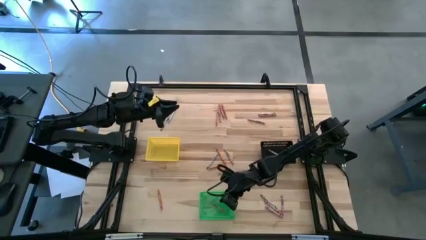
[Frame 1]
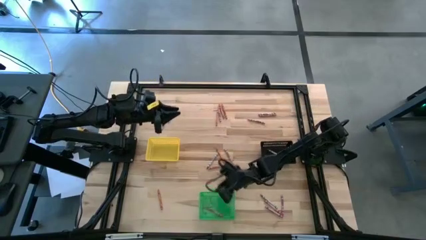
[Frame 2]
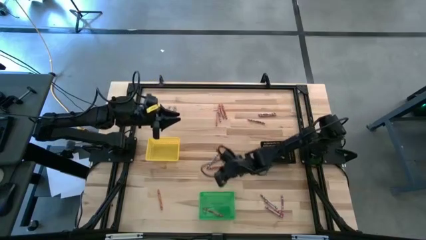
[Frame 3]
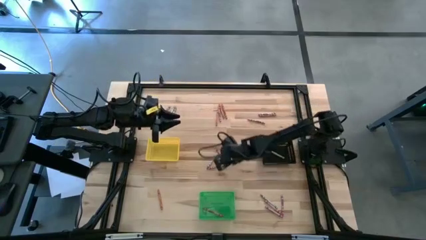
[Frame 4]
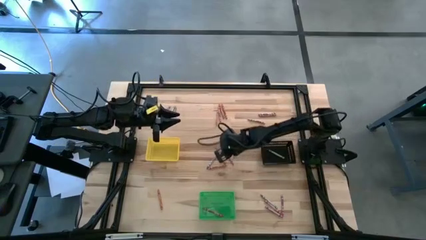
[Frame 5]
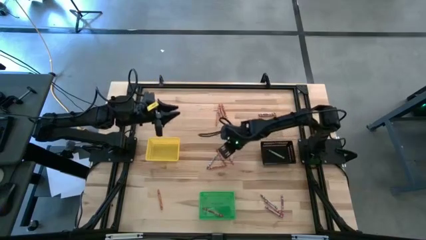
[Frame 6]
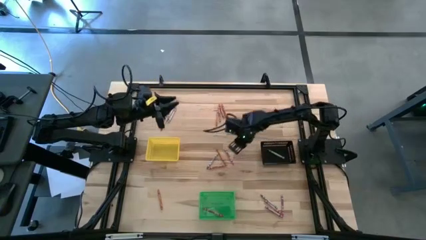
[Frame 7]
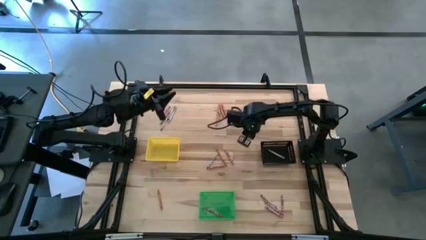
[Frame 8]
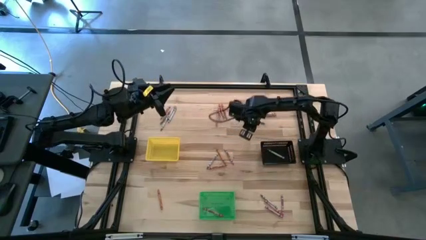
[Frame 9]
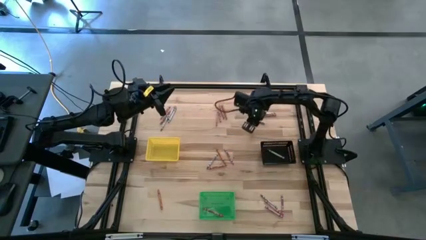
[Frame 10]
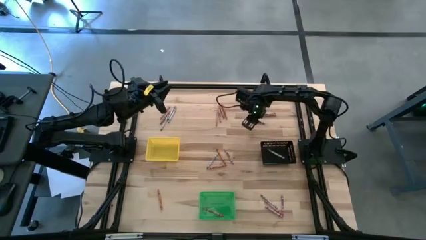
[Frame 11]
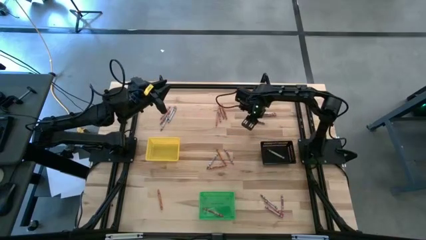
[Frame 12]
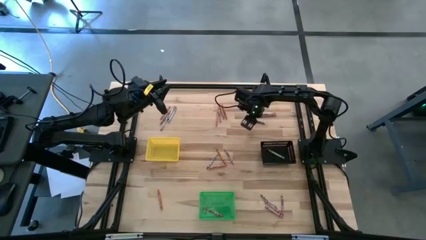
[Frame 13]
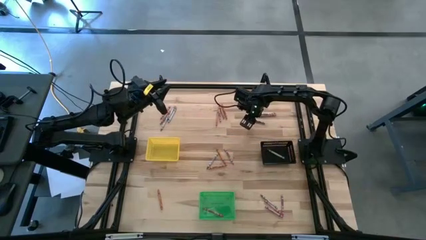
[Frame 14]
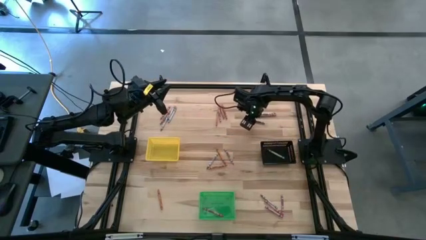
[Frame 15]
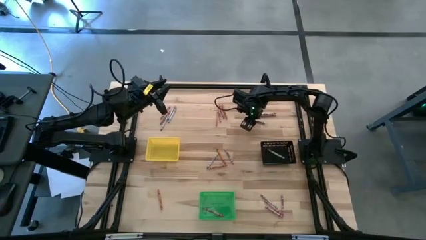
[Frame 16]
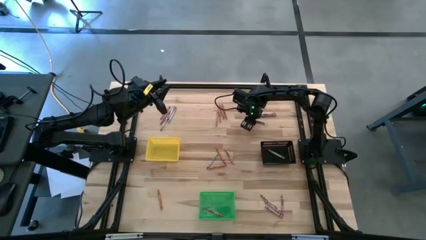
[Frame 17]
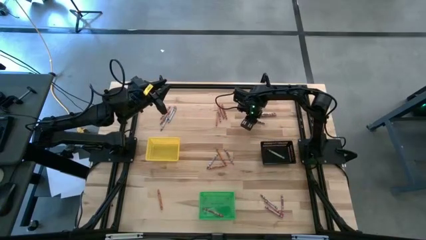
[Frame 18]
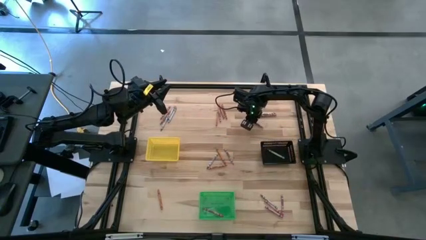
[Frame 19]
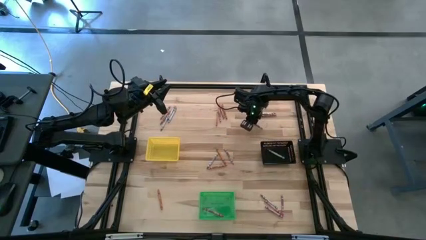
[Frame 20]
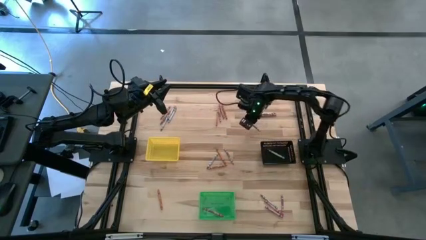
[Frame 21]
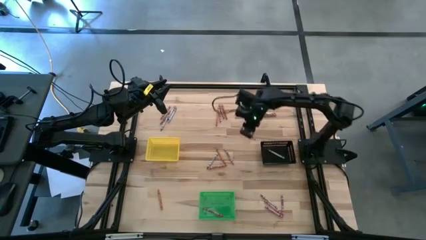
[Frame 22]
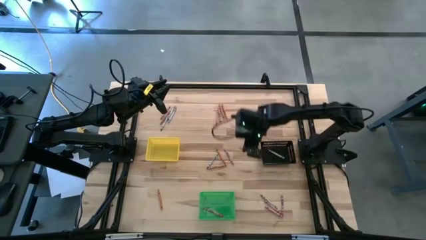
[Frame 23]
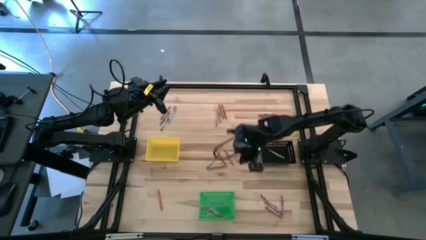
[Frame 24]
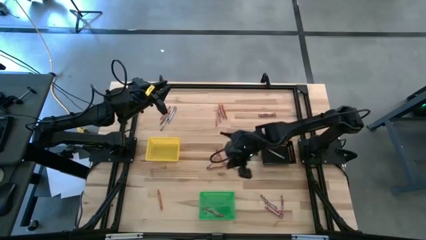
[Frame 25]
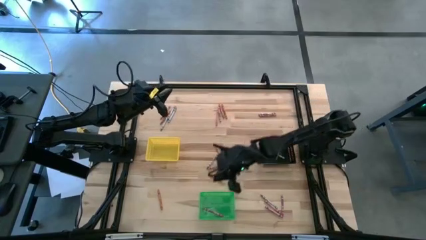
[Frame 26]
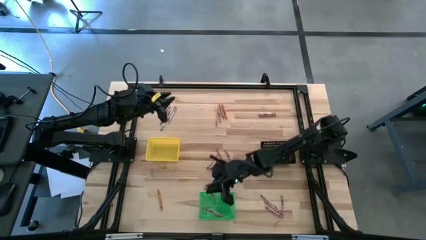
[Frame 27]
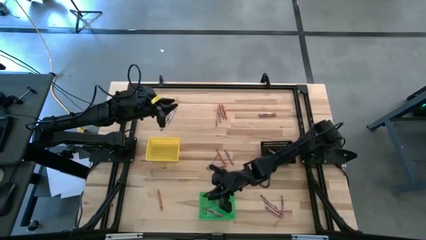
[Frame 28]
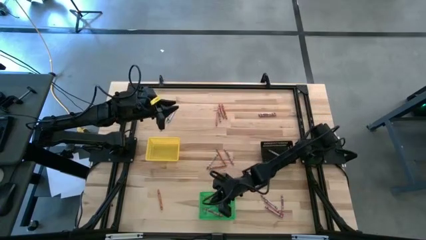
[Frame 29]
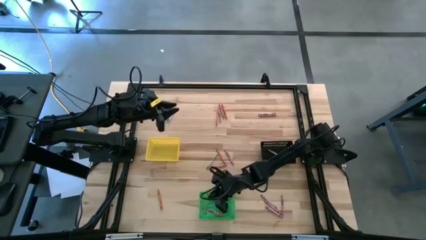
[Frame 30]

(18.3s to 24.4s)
Task: Sort crayons
Put the pink crayon into the green bin

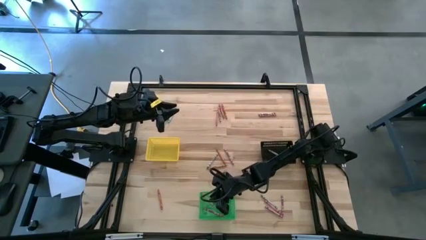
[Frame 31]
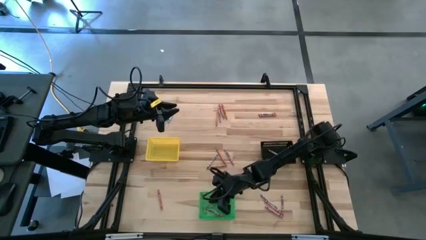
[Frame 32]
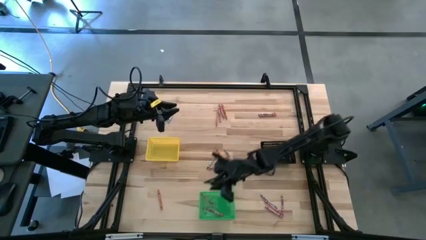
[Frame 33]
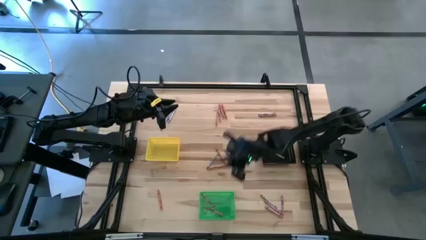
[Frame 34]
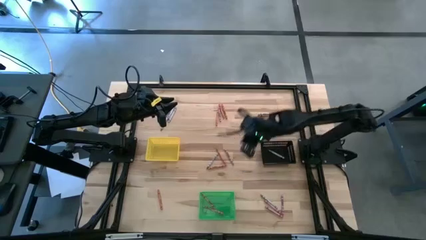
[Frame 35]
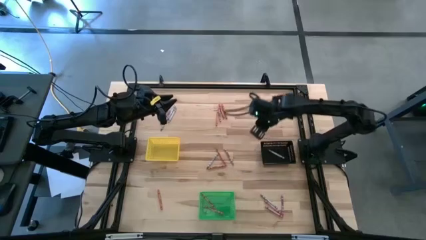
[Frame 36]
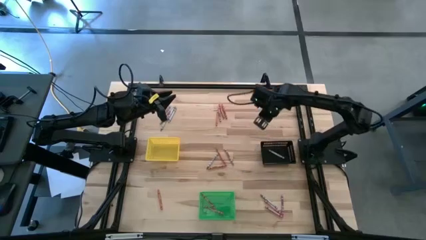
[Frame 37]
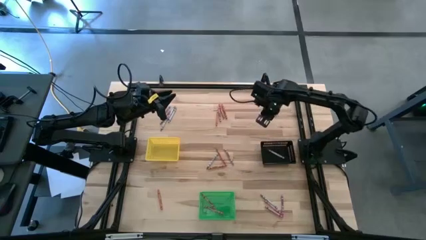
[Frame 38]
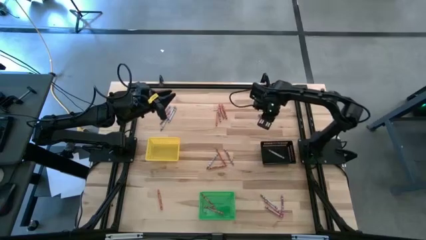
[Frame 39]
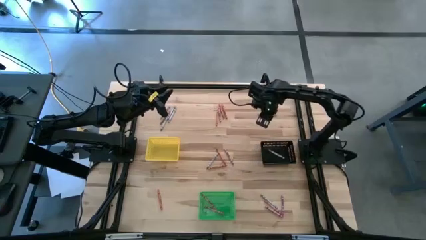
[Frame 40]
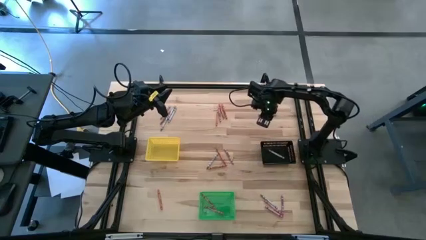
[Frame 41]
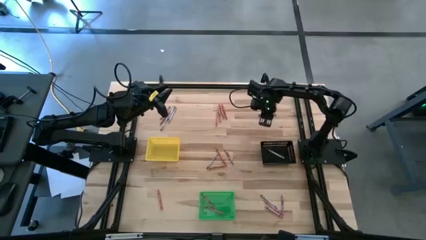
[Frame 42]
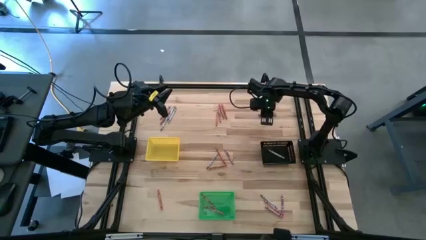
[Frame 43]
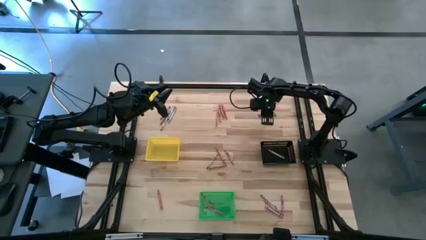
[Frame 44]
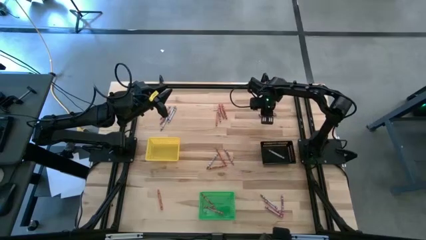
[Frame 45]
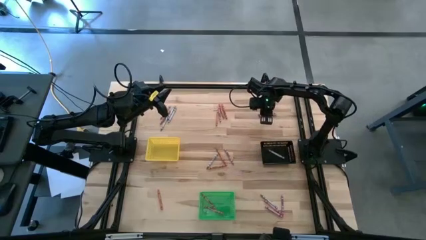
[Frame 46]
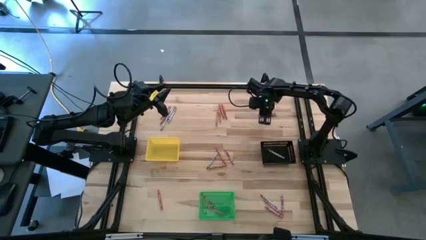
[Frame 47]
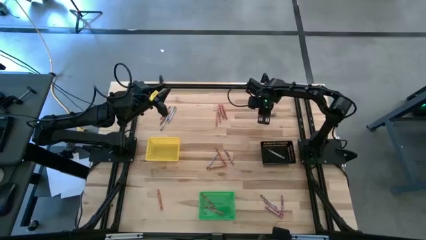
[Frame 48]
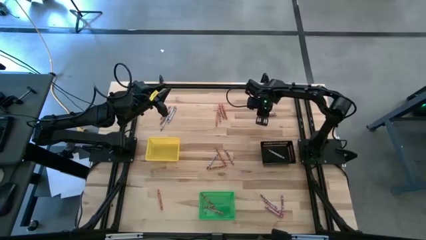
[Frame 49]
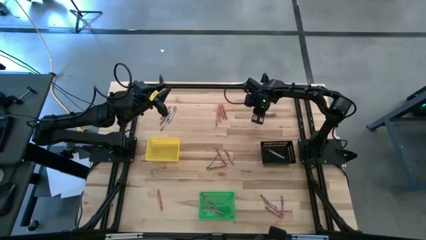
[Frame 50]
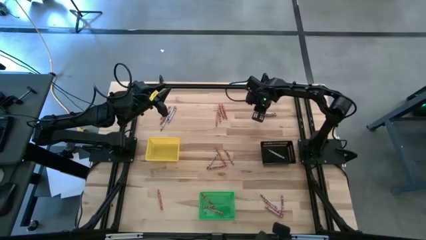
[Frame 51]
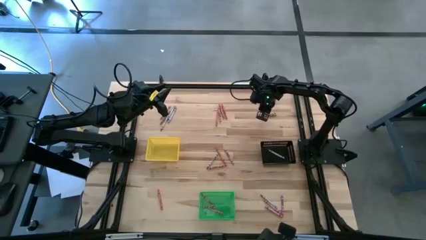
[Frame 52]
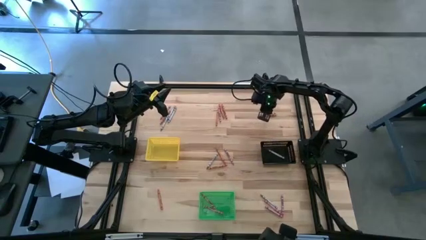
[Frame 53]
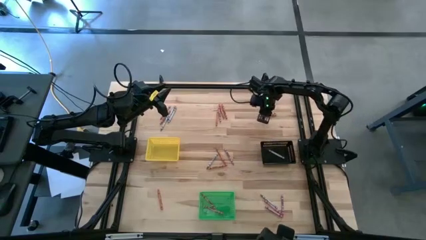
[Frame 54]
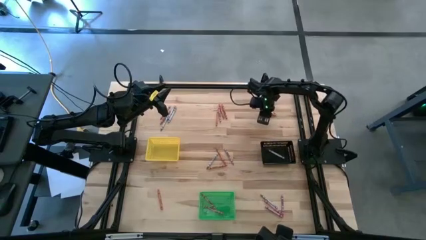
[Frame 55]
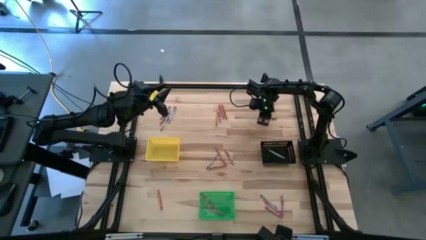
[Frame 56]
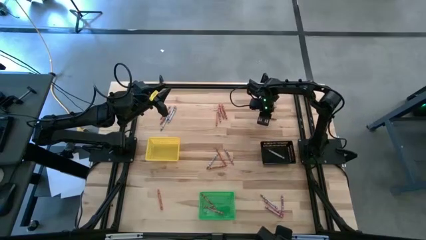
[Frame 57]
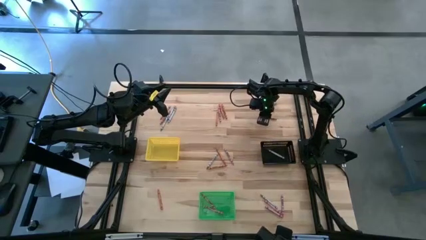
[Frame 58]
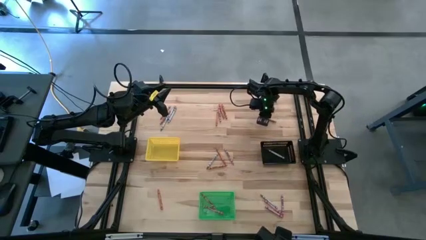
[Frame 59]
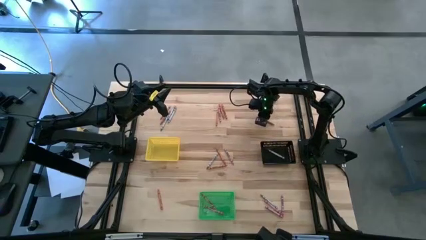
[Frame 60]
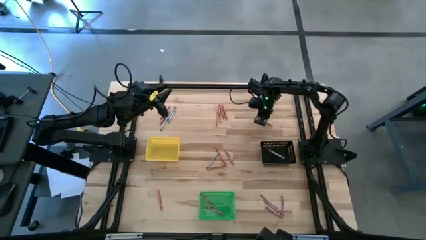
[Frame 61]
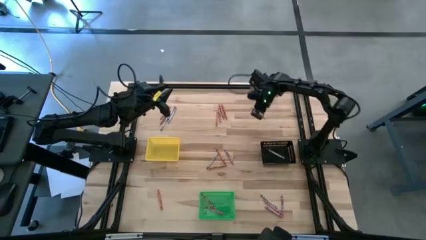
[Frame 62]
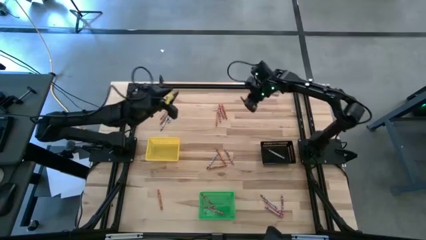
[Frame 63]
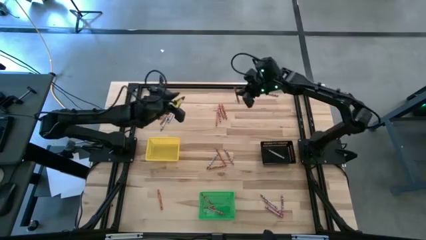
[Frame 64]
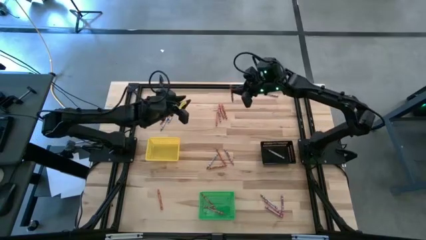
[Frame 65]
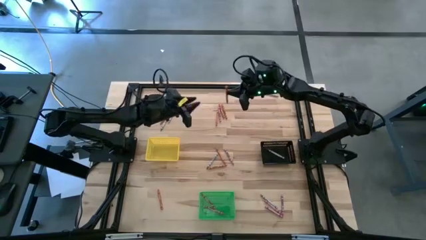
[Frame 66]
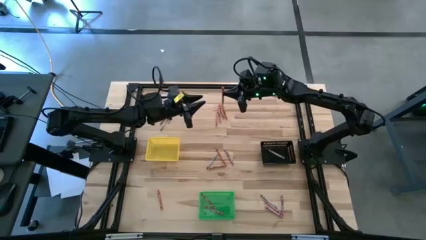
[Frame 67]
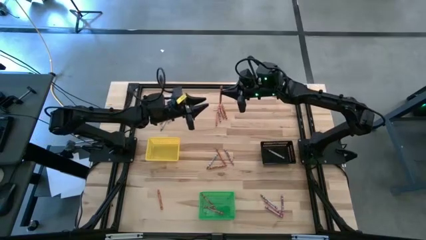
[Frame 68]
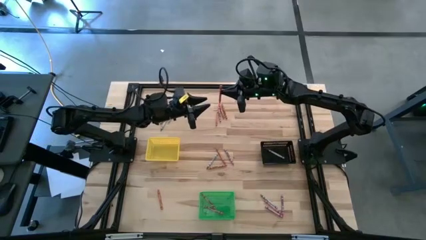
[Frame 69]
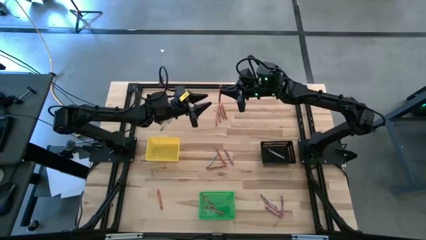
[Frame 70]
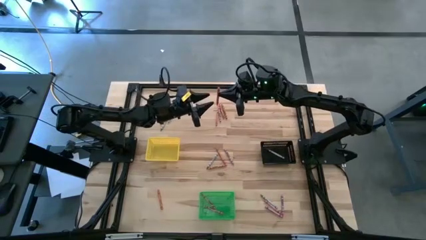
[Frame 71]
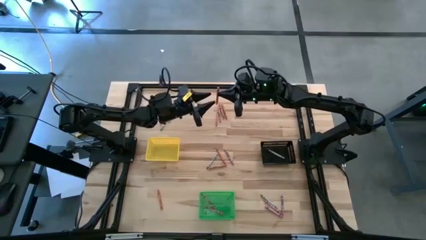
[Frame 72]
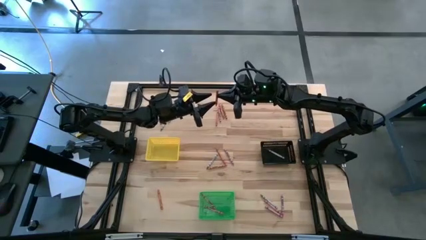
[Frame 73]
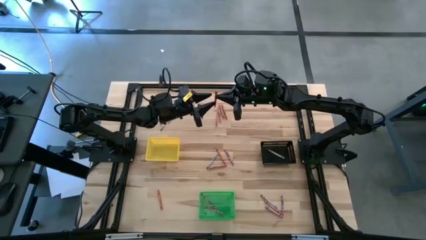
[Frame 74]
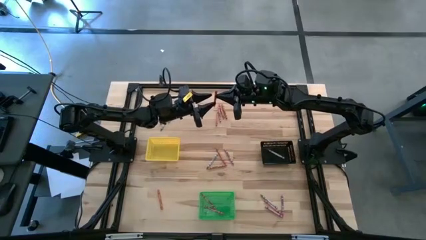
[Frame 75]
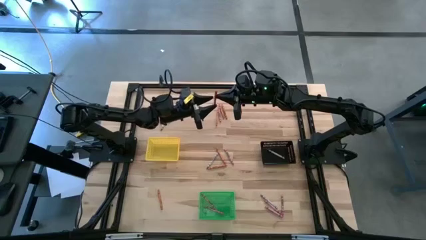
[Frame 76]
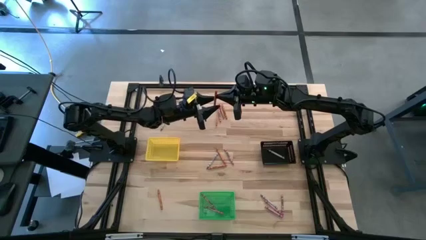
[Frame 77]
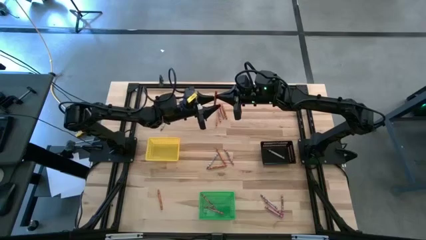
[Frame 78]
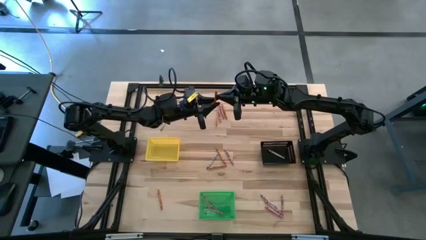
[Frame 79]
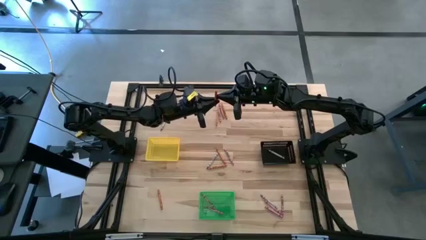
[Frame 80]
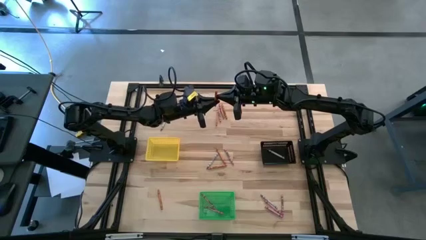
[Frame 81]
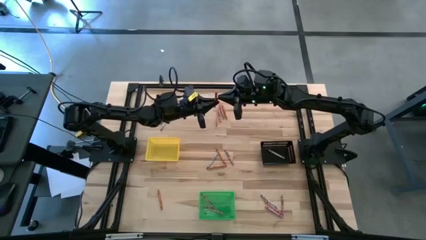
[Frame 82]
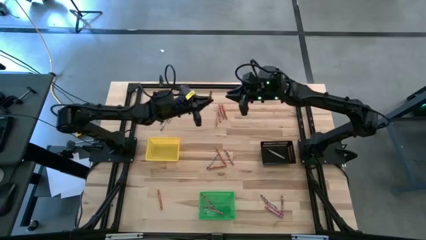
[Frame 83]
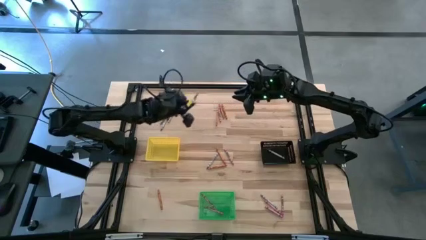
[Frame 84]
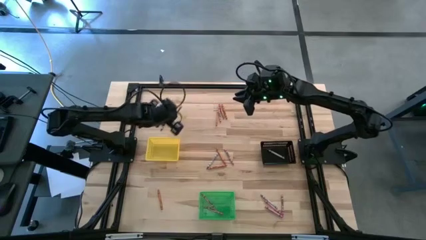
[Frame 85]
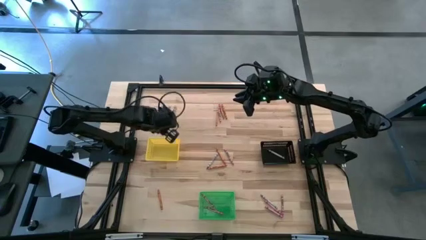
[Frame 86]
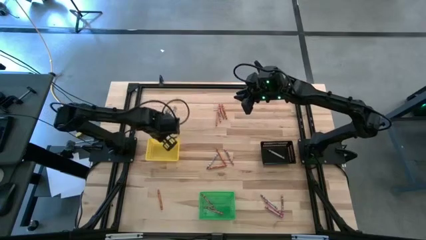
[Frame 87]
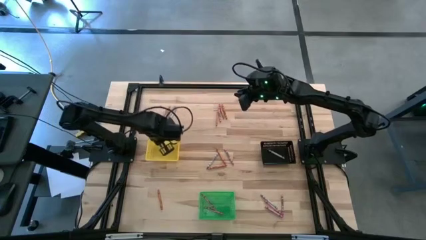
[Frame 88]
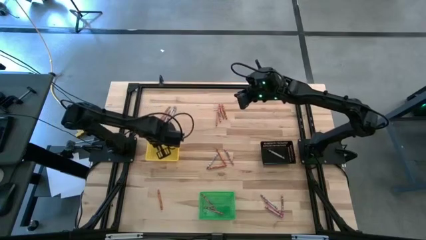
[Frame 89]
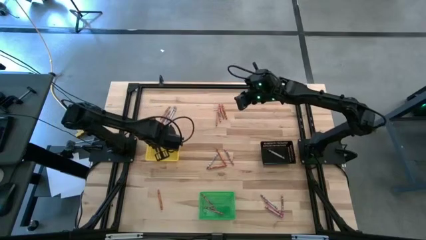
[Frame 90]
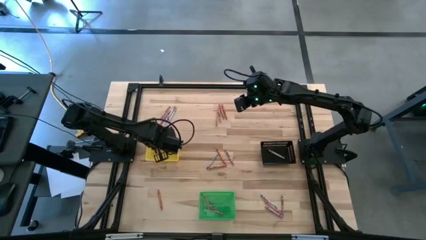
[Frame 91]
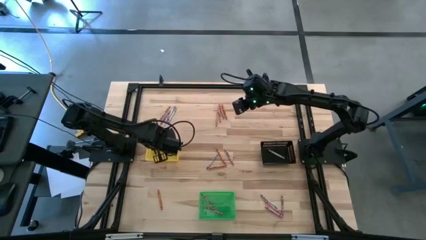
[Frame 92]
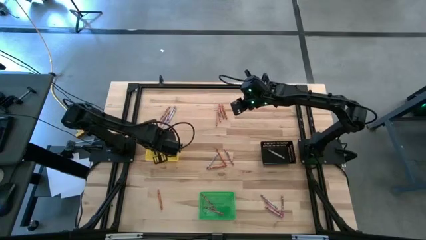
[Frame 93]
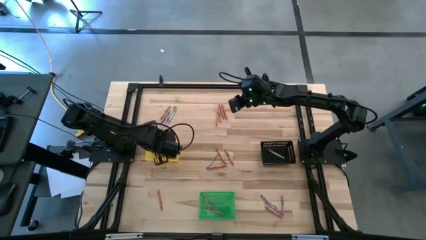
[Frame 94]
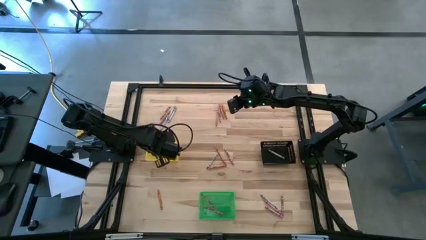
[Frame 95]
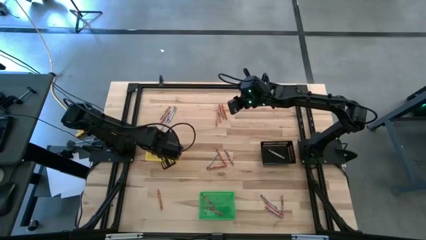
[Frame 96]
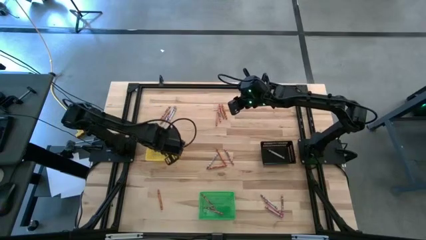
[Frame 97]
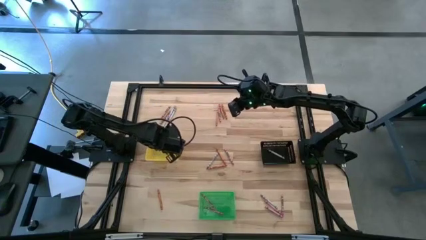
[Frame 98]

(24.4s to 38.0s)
Put the orange crayon into the yellow bin
